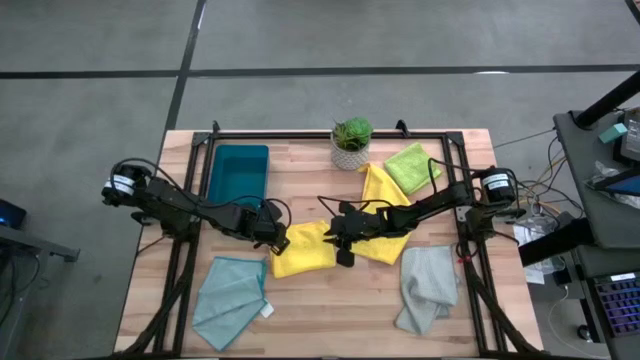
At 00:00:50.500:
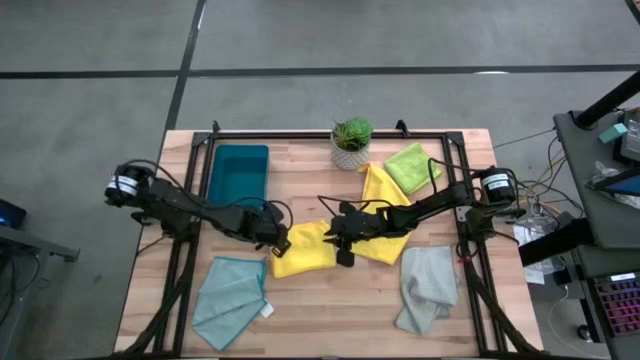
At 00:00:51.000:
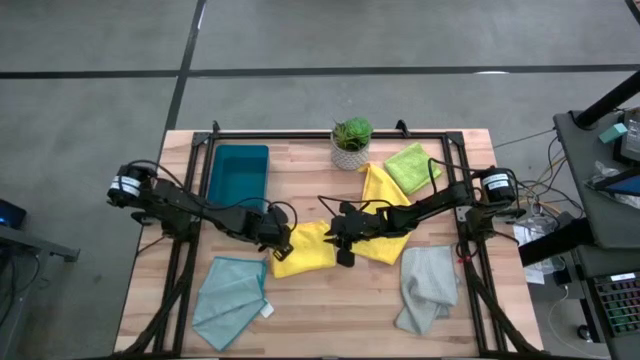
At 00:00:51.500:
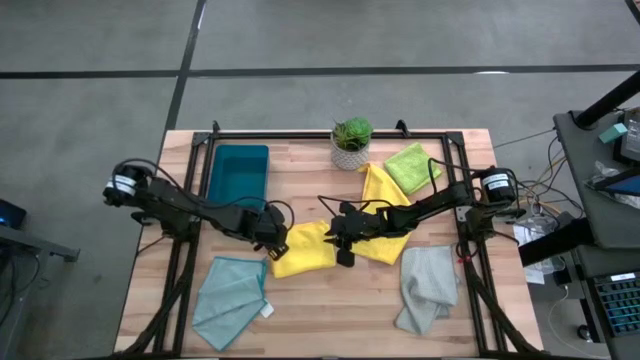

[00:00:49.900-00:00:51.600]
Task: Fold microfiber towels
Fold the left yellow towel

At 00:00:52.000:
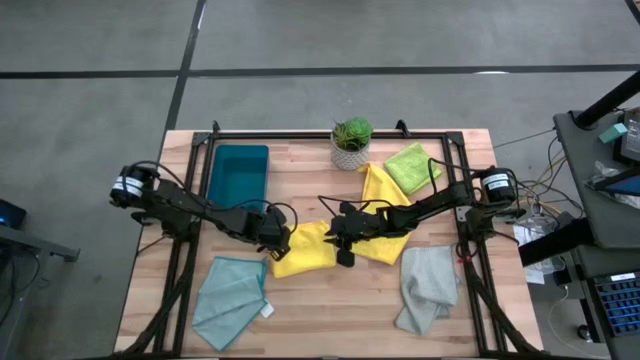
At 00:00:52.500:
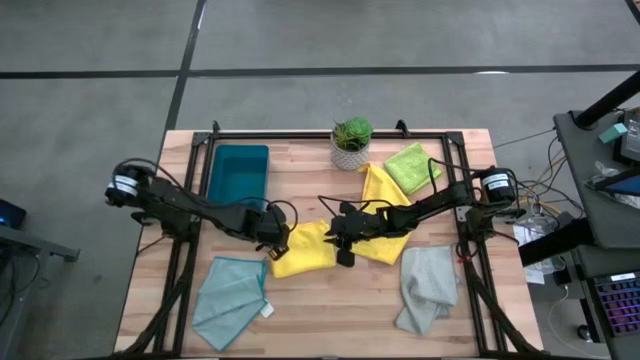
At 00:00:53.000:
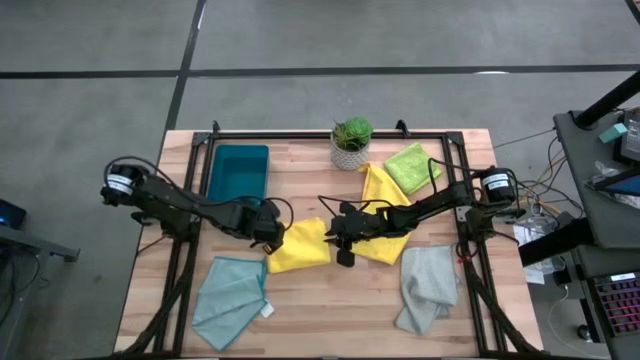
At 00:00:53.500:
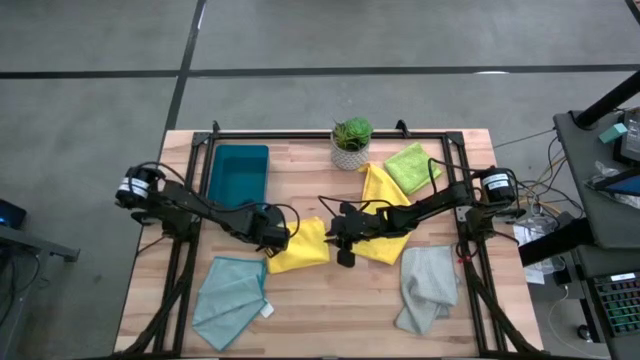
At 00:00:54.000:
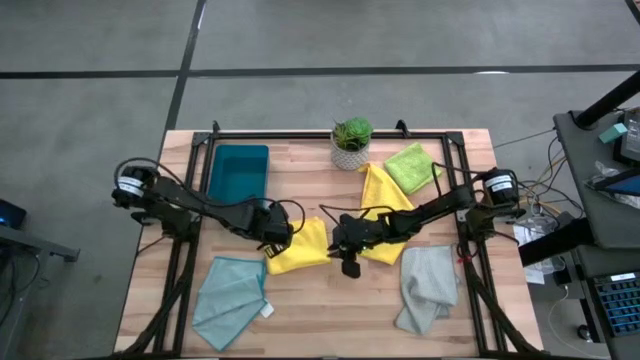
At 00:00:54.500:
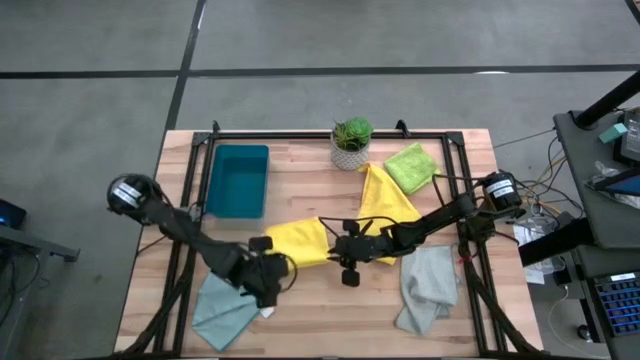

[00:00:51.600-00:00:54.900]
Fold the left yellow towel

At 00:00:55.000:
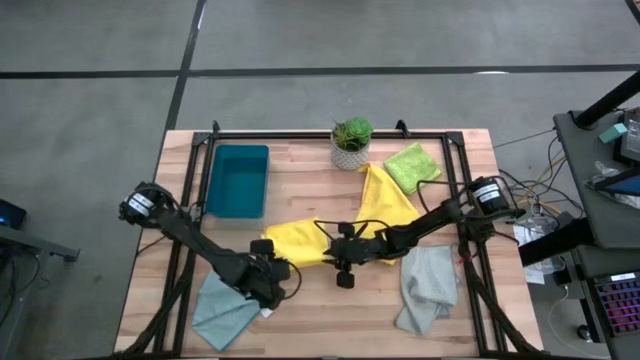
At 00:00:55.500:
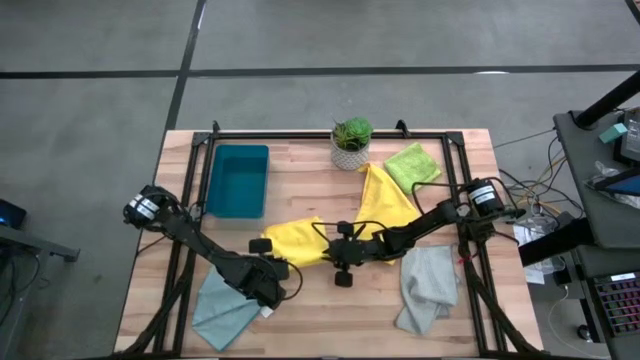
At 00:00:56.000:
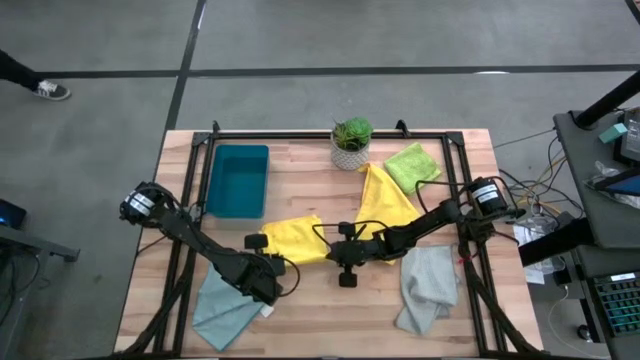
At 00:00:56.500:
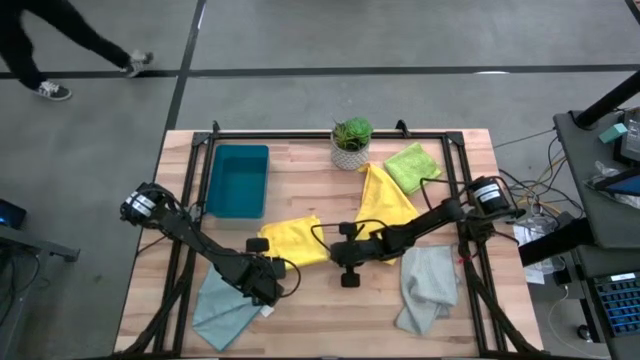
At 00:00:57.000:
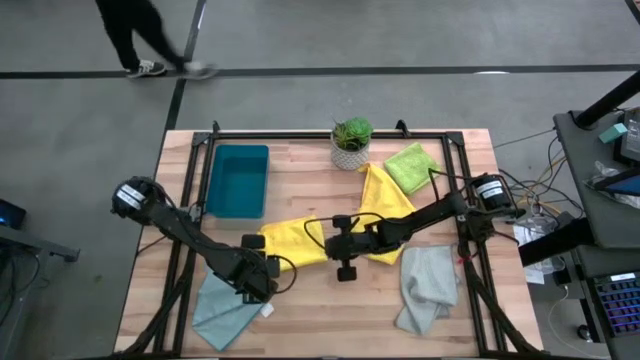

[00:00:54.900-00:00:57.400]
Fold the left yellow towel

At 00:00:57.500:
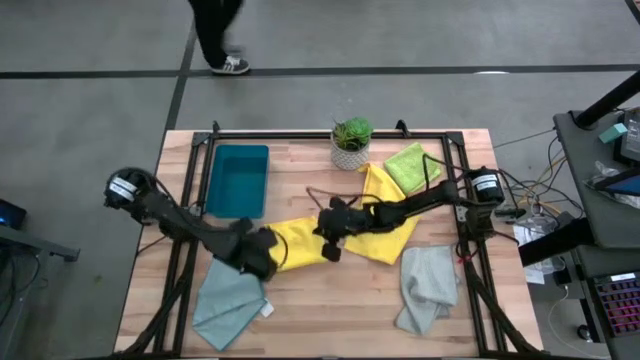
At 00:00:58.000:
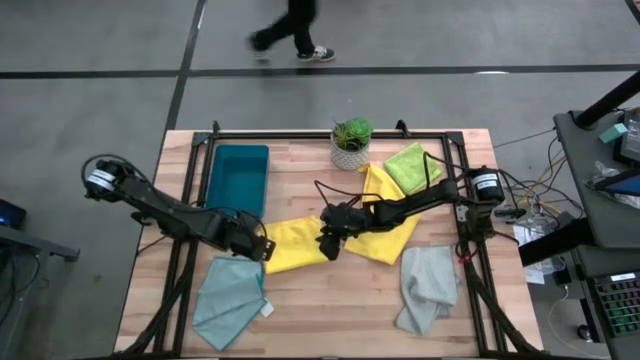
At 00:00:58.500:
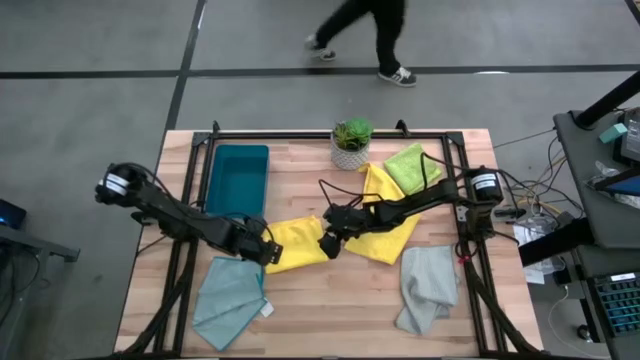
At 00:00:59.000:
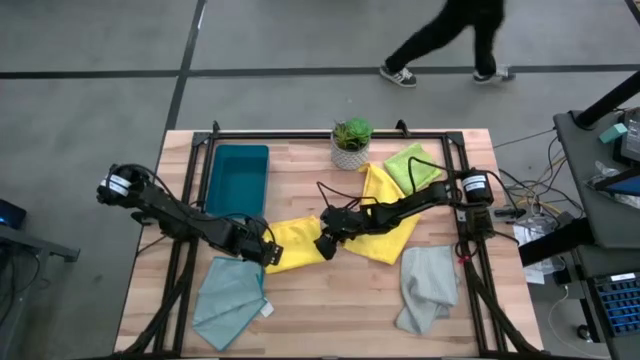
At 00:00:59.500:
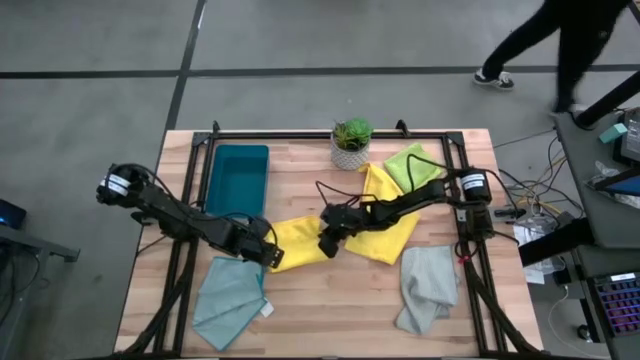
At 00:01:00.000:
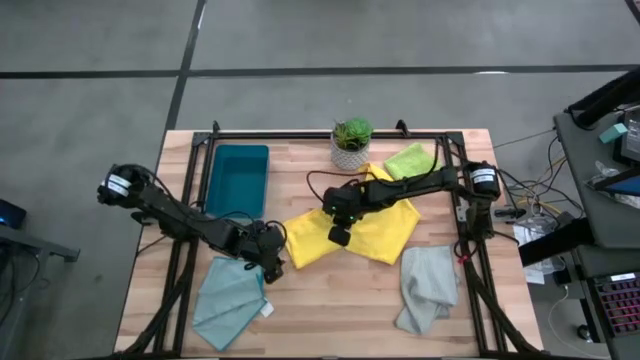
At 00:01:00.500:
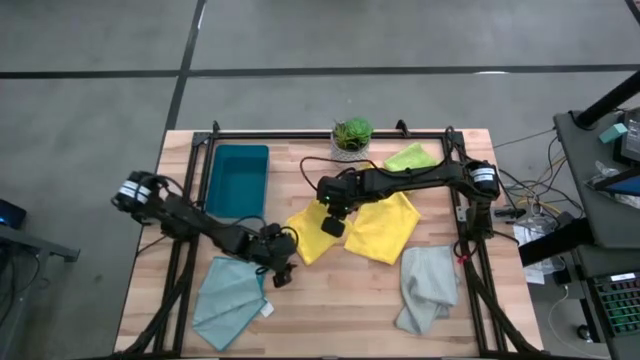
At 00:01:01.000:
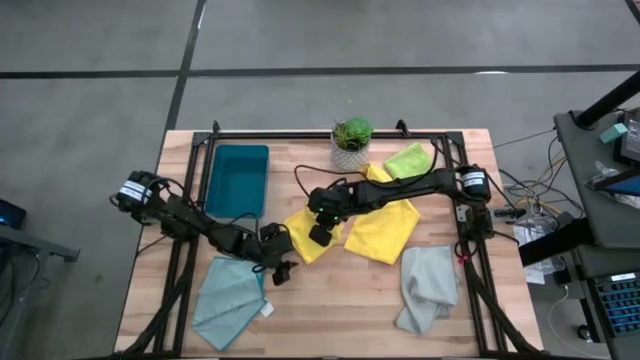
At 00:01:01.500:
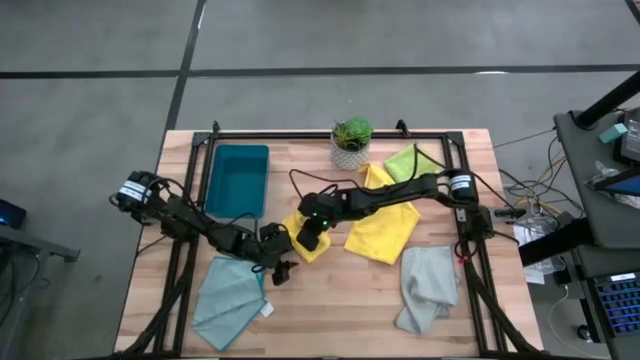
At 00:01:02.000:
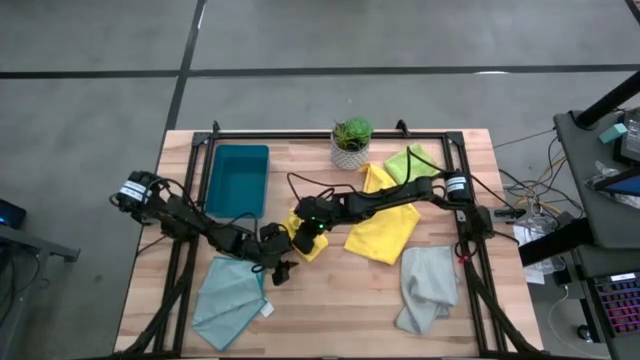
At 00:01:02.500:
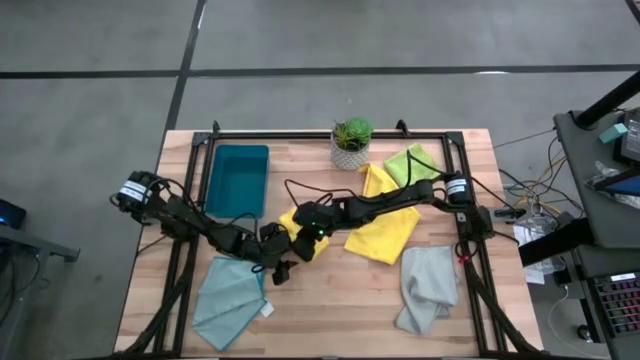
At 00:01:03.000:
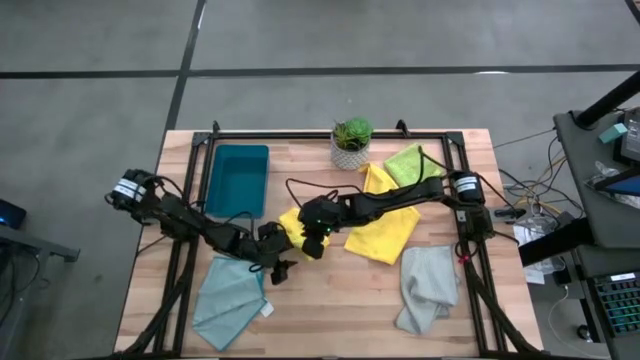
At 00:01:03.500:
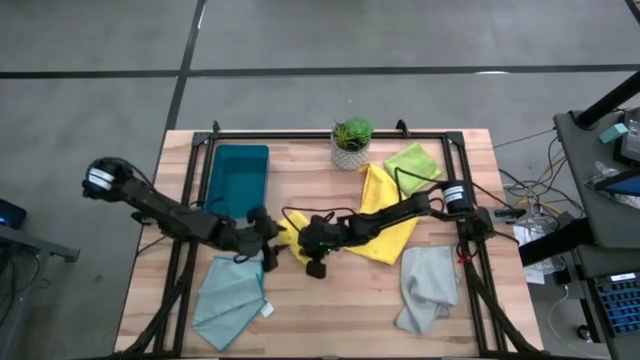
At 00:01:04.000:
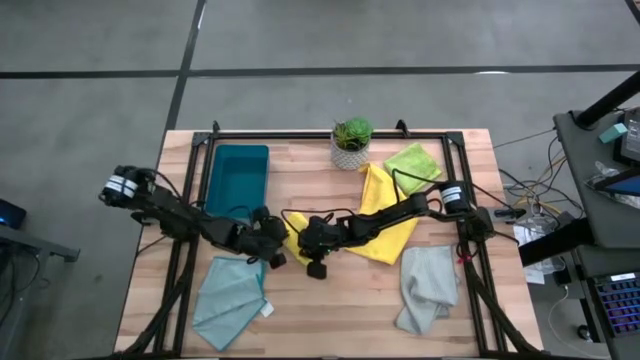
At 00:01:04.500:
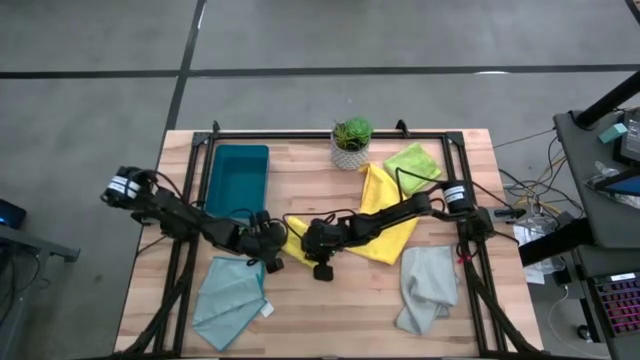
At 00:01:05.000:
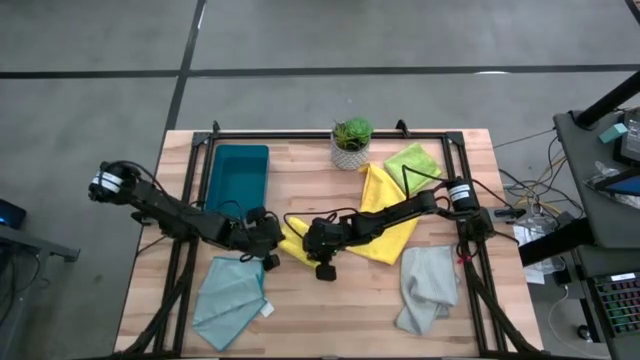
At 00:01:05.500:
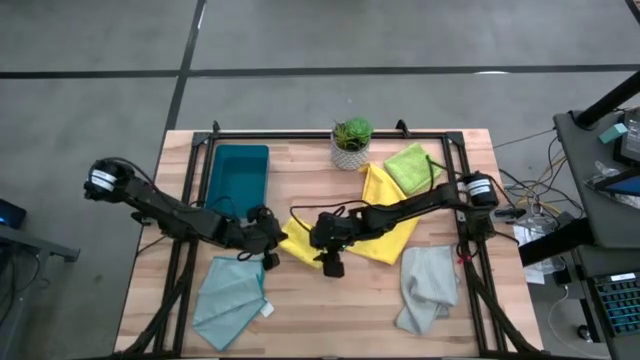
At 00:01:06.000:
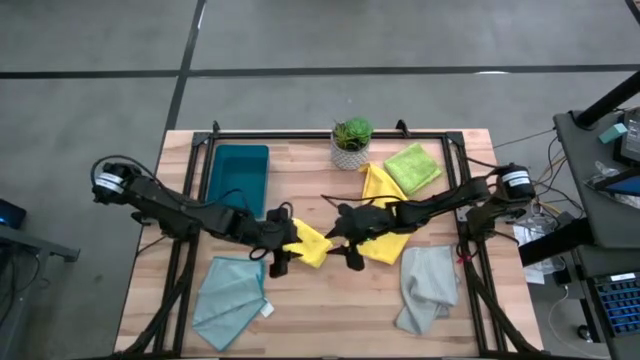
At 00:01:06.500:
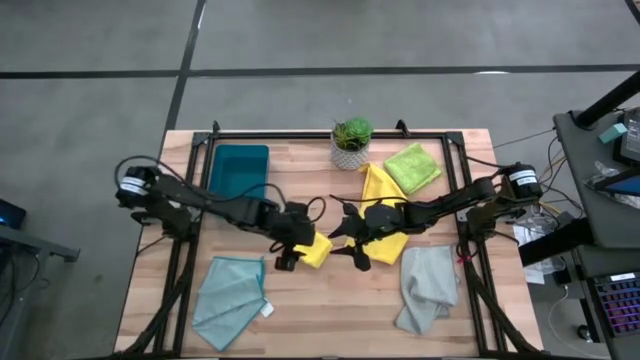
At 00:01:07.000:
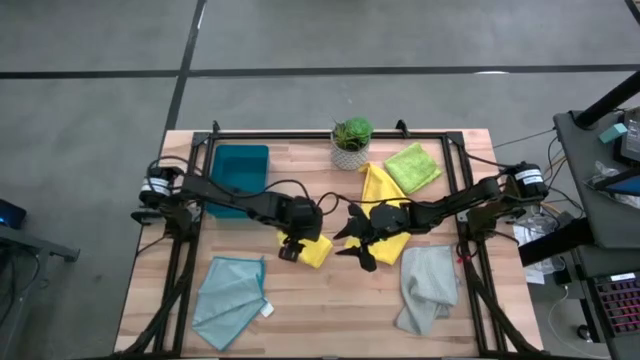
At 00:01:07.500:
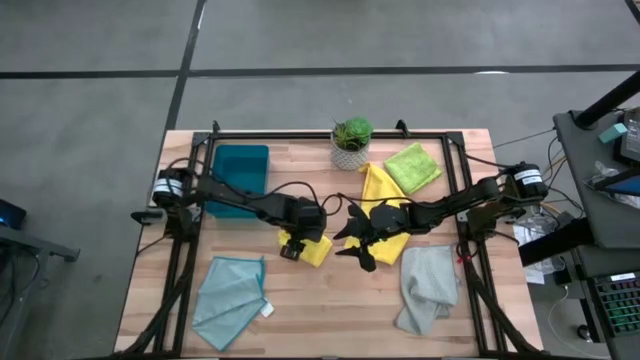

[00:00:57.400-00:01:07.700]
Fold the left yellow towel

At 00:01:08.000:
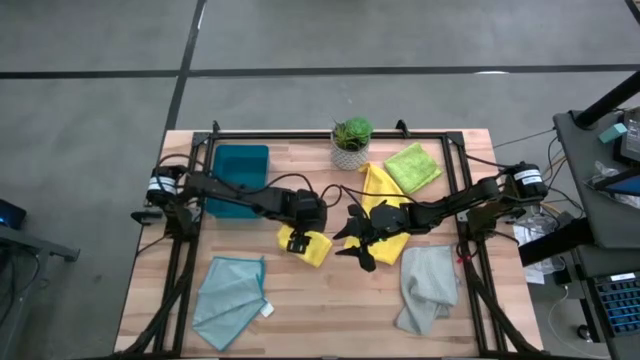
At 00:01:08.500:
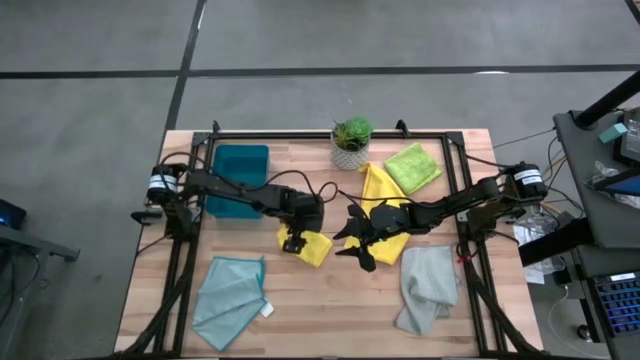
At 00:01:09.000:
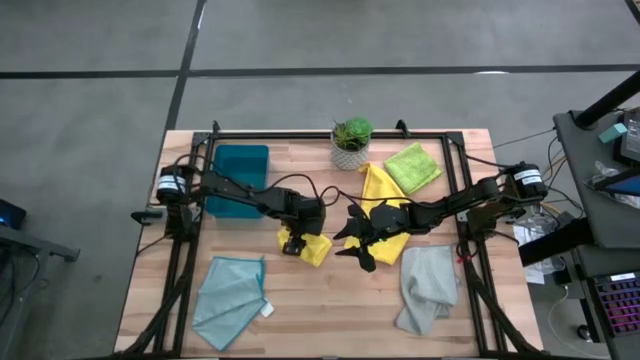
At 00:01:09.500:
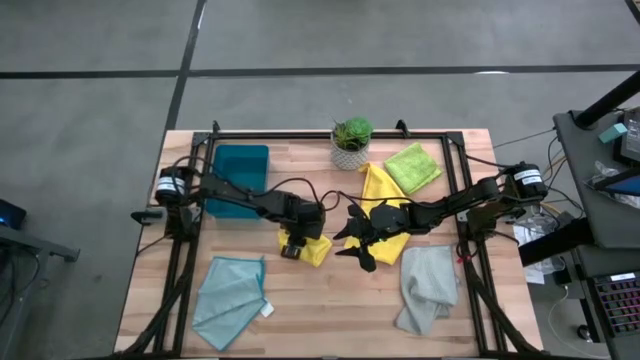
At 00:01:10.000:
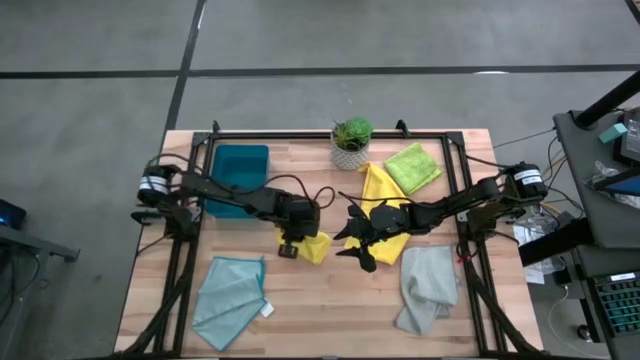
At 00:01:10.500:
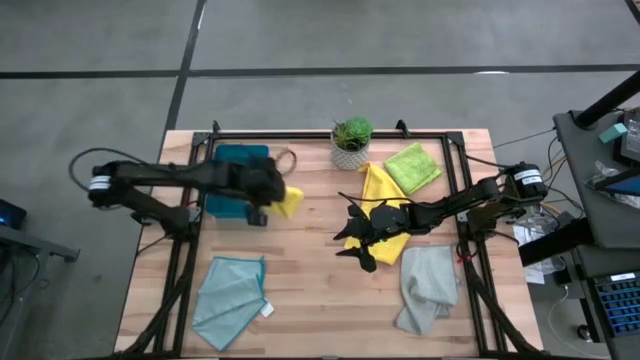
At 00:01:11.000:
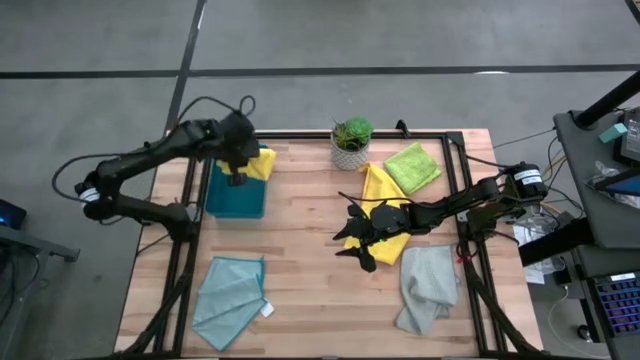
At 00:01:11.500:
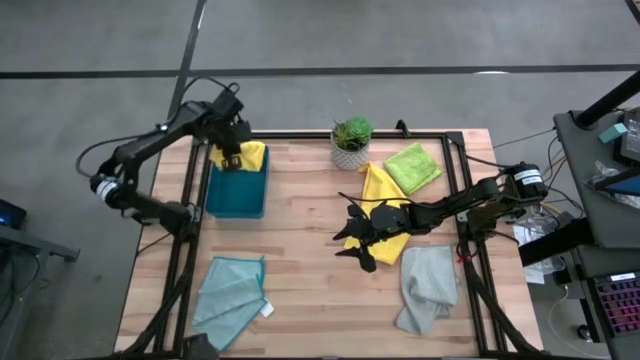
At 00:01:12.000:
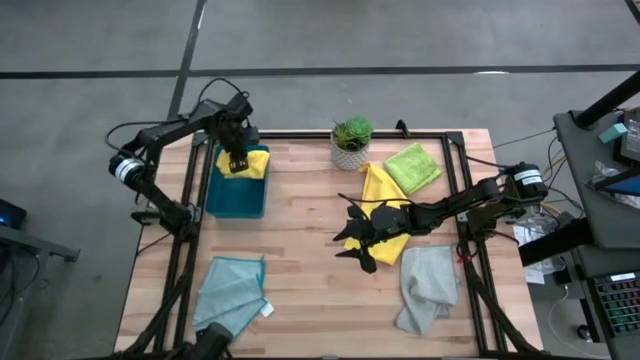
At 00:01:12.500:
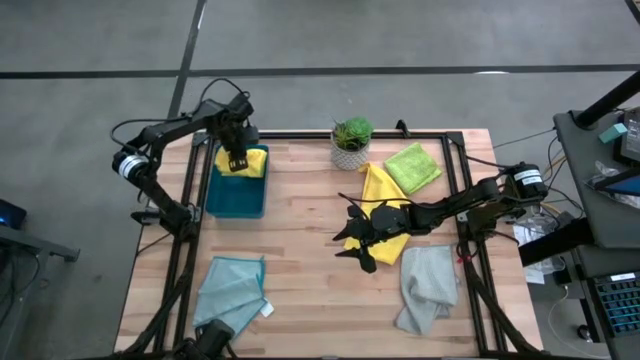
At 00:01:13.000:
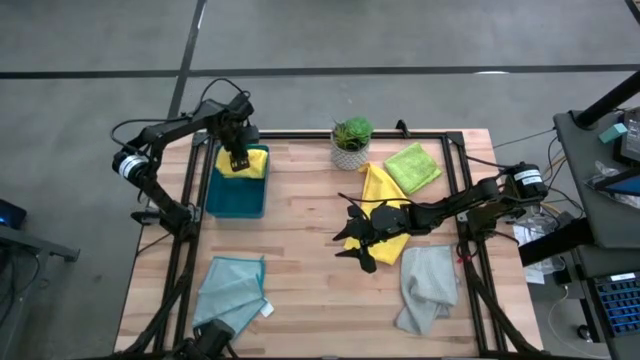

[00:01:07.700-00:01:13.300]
Put the left yellow folded towel into the blue bin
